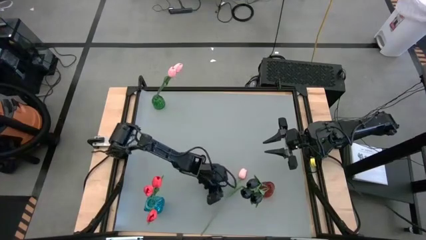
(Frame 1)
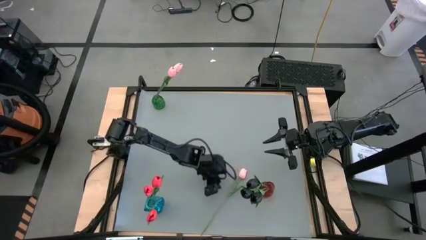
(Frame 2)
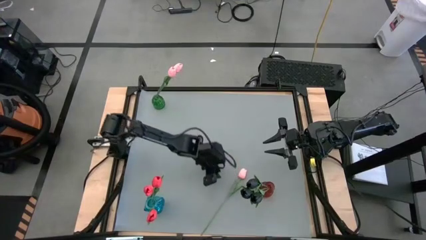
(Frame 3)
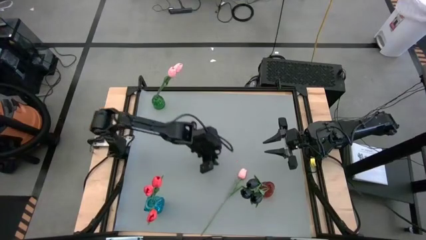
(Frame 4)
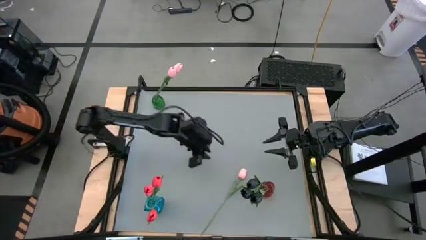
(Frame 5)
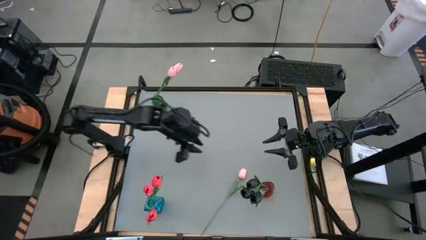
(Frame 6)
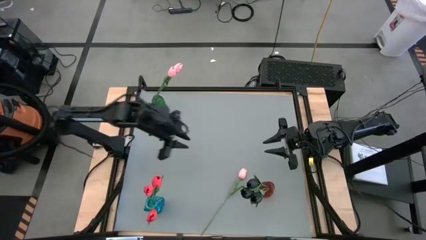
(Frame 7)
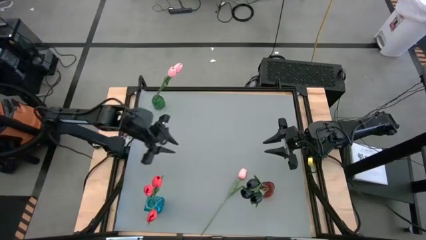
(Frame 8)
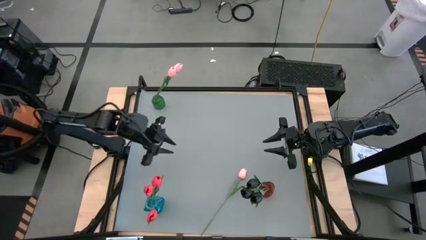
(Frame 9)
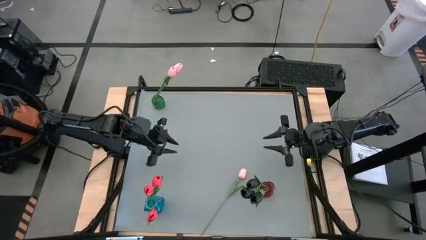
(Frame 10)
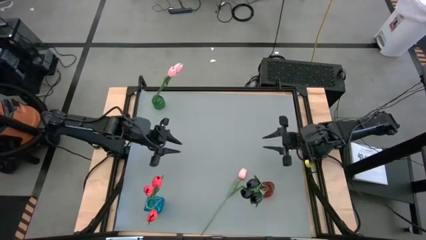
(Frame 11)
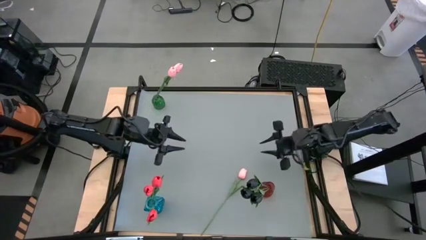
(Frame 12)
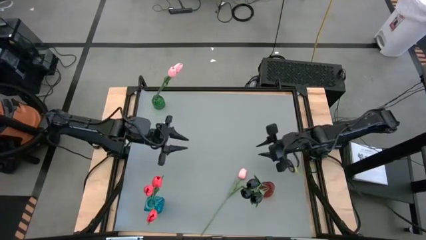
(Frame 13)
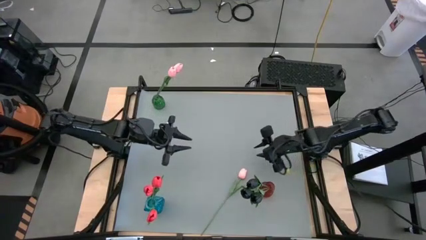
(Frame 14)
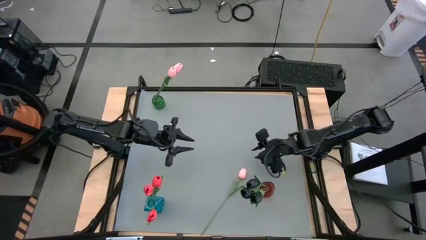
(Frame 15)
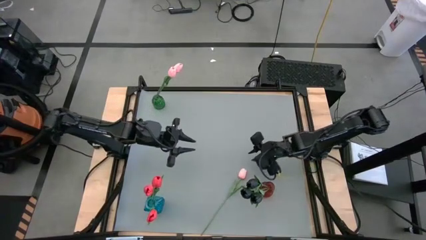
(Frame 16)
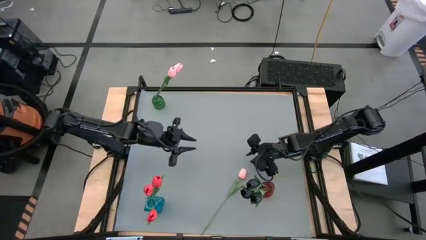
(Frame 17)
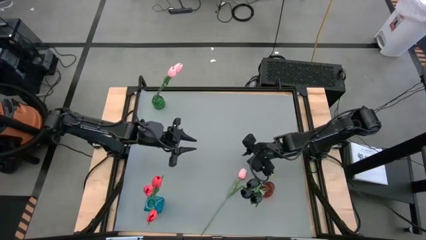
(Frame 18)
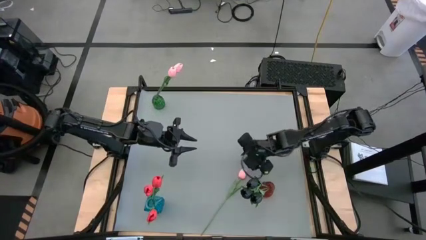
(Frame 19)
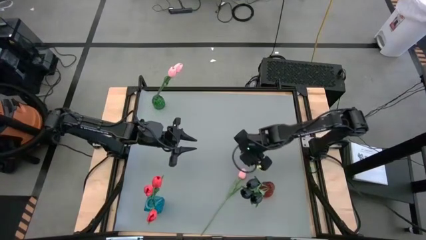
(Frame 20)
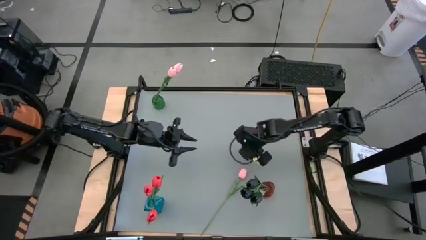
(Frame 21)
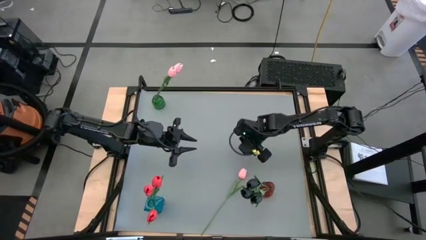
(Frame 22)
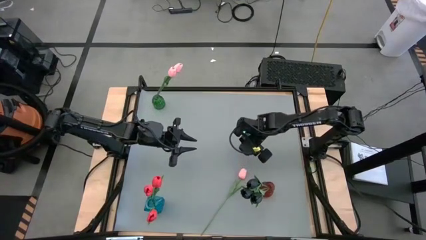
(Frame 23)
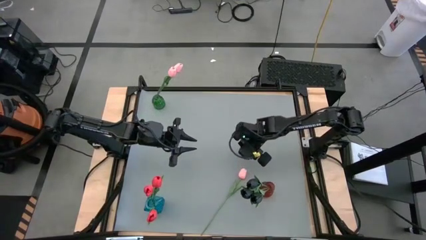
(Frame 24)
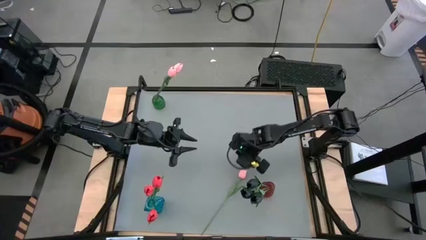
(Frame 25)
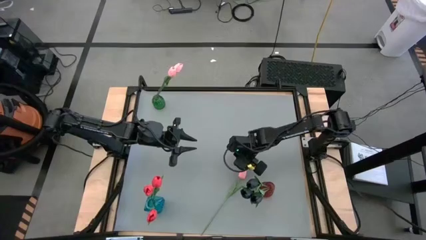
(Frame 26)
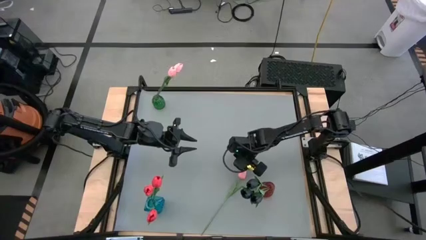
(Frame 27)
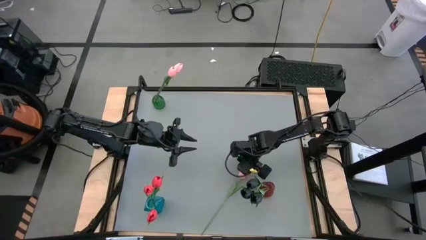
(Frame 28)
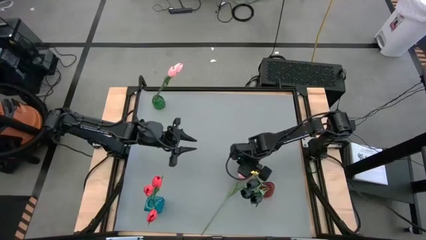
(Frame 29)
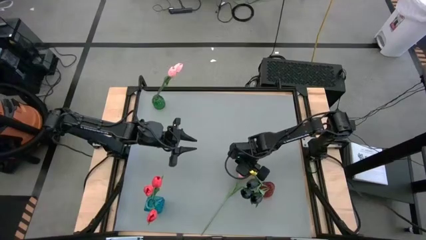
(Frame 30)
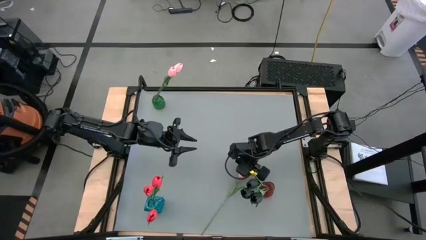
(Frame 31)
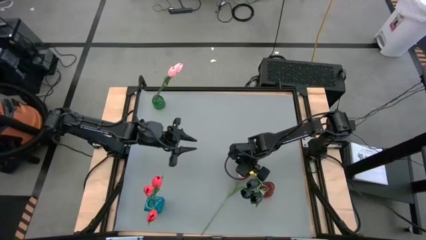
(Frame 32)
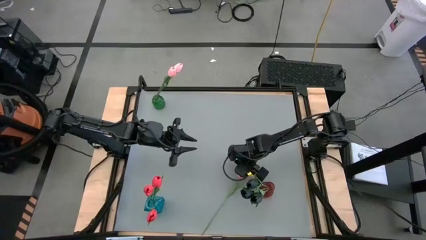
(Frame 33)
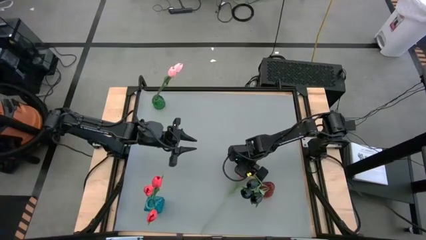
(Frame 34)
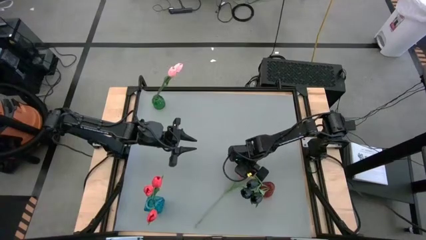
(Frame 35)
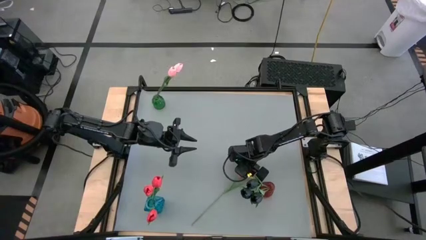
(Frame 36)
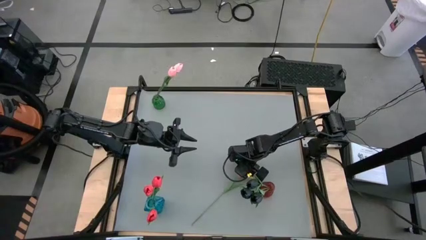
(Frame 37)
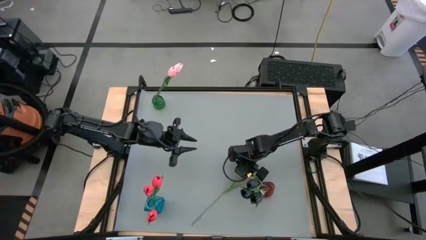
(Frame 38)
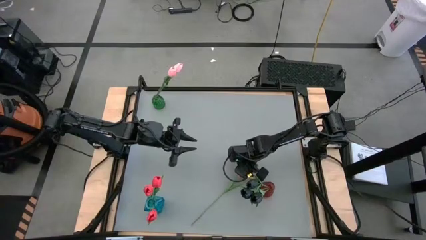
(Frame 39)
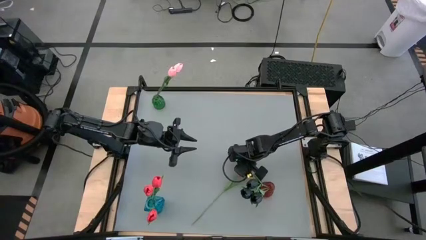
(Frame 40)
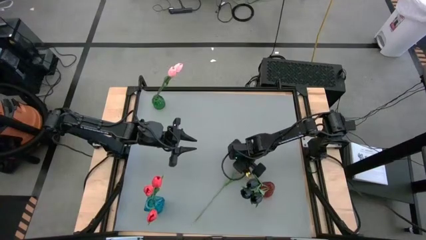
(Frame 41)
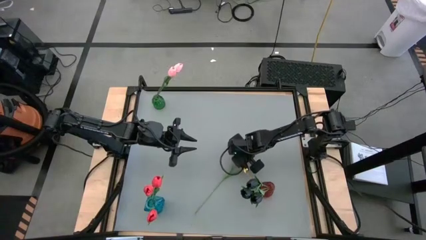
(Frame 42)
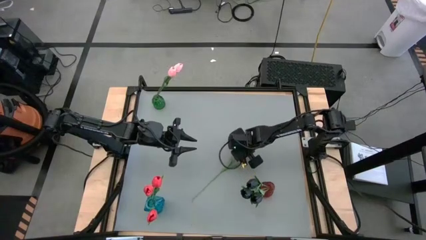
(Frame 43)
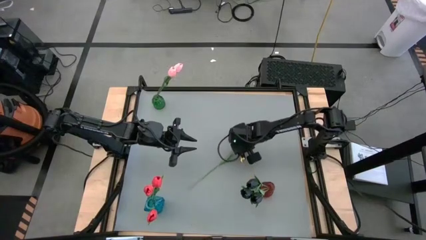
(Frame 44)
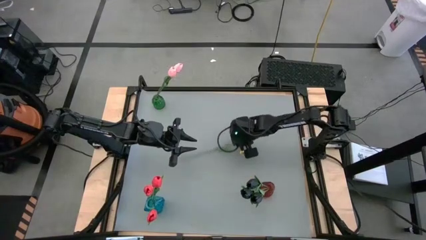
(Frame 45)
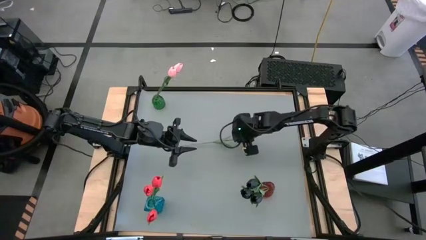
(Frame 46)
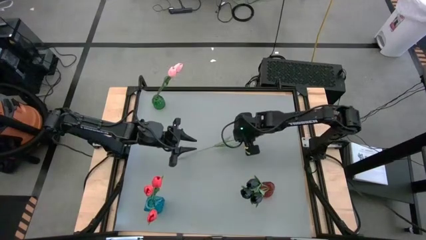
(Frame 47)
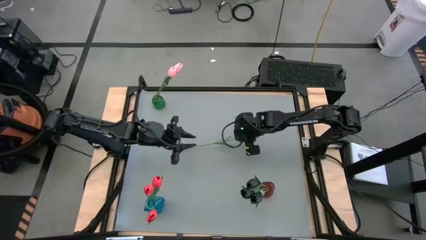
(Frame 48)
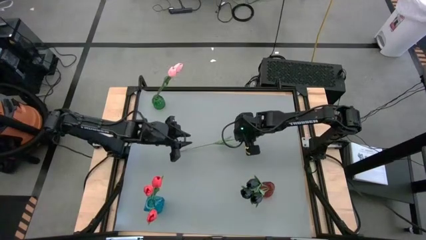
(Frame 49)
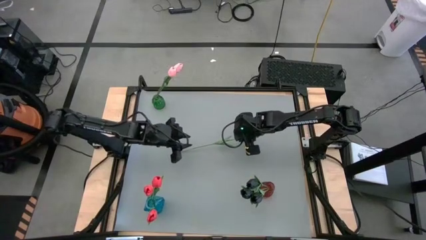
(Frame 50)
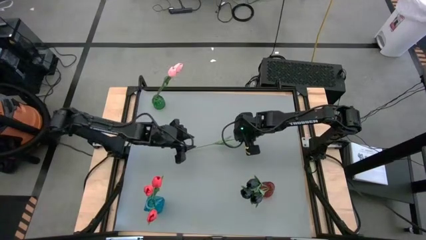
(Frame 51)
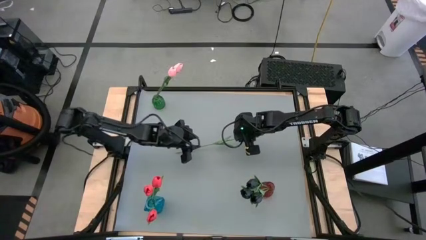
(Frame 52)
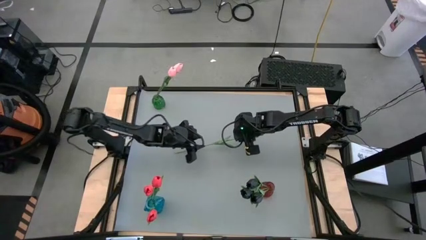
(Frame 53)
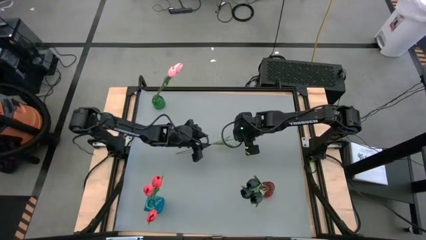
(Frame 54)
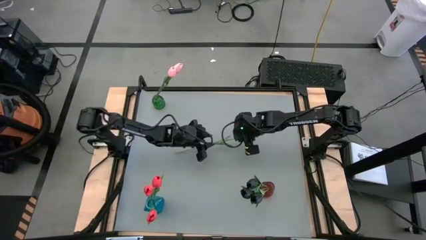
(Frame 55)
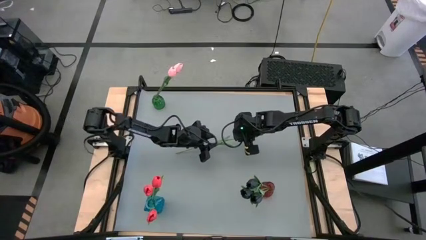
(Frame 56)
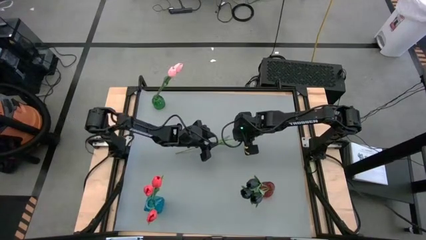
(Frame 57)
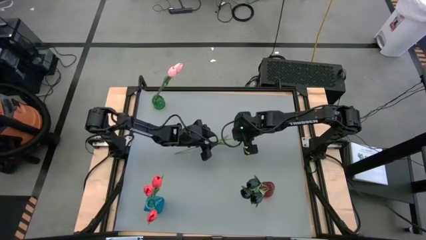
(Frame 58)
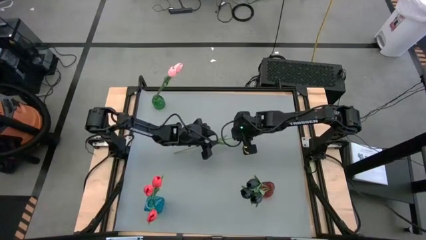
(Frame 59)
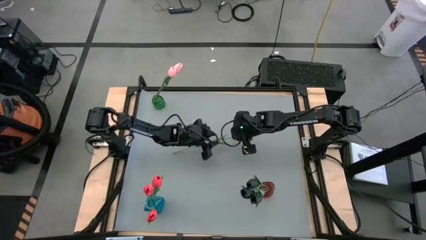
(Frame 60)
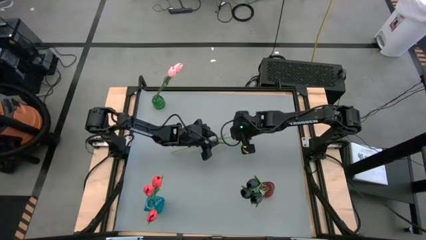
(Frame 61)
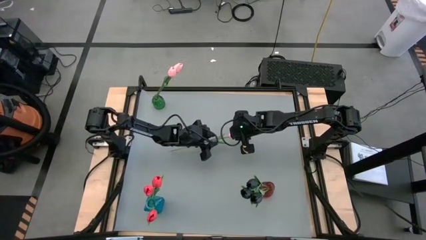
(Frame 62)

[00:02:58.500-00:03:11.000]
Task: Sort flowers into vase by color
Put the pink flower into the green vase
